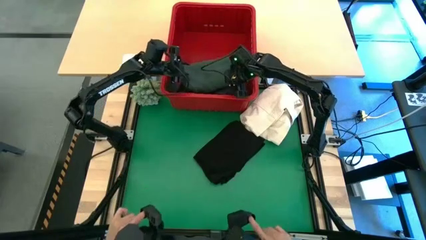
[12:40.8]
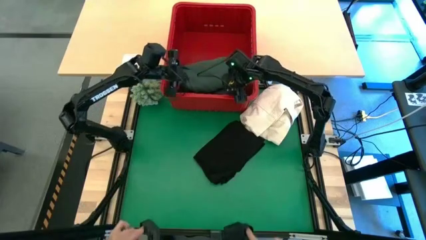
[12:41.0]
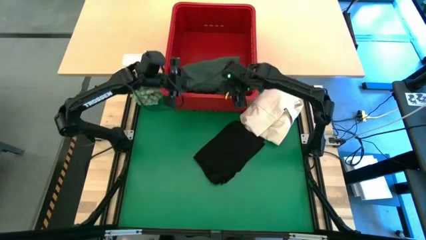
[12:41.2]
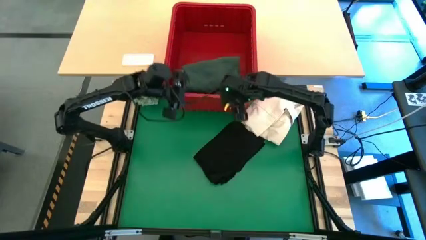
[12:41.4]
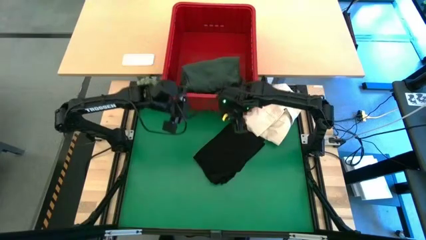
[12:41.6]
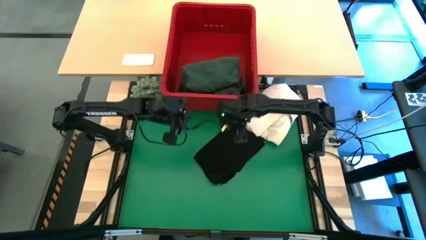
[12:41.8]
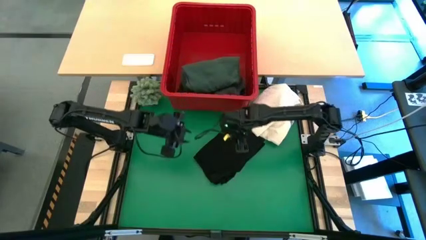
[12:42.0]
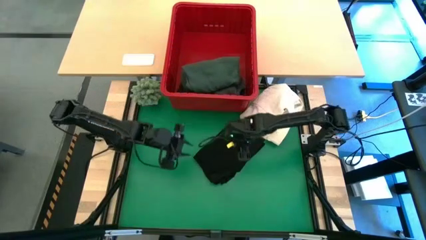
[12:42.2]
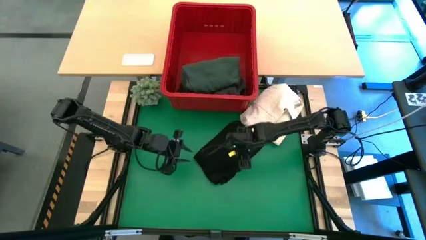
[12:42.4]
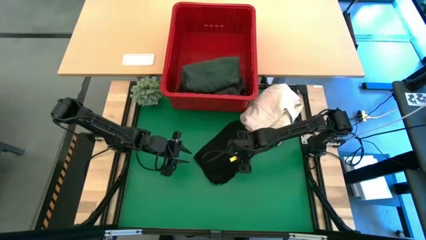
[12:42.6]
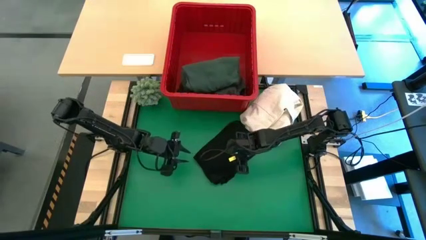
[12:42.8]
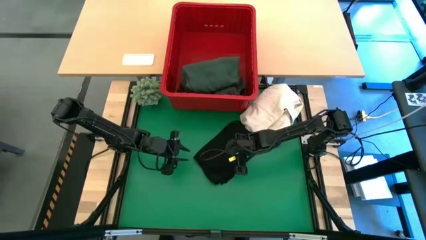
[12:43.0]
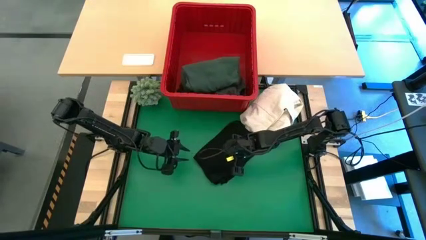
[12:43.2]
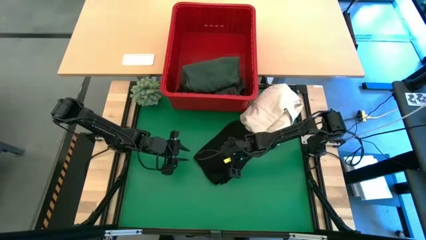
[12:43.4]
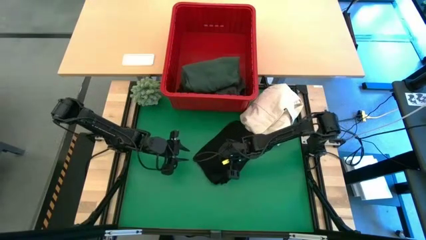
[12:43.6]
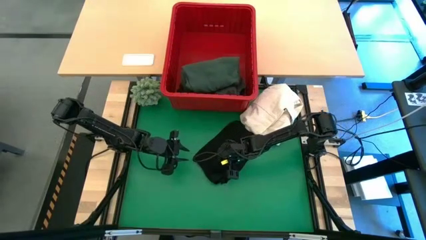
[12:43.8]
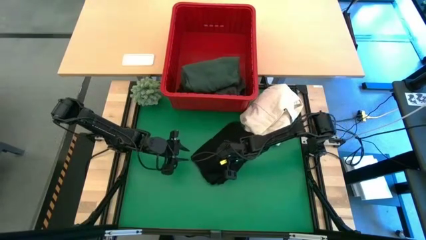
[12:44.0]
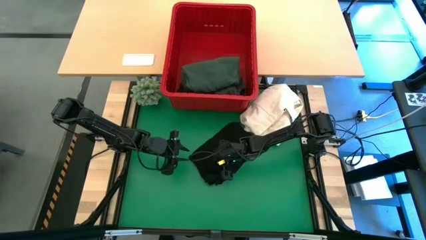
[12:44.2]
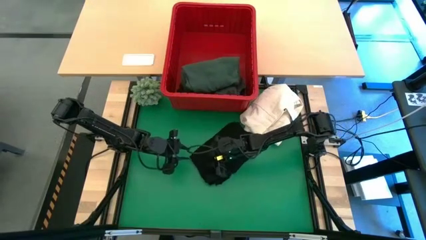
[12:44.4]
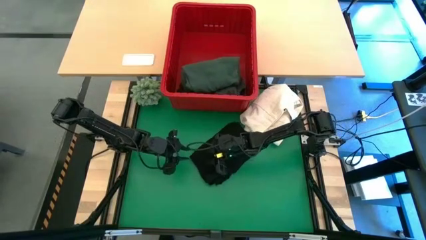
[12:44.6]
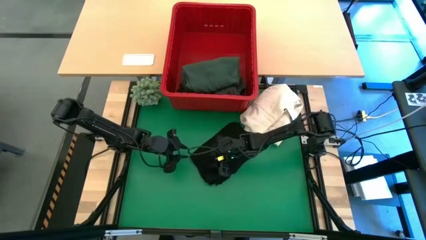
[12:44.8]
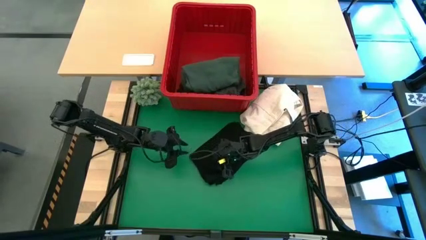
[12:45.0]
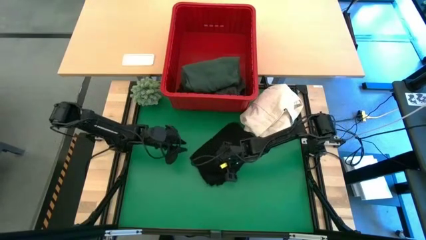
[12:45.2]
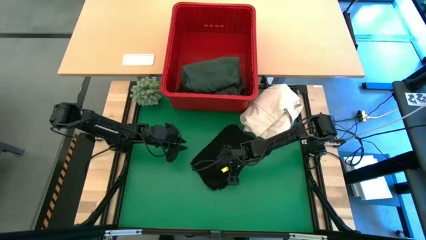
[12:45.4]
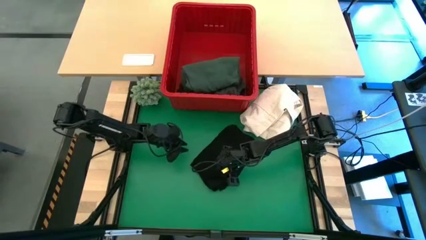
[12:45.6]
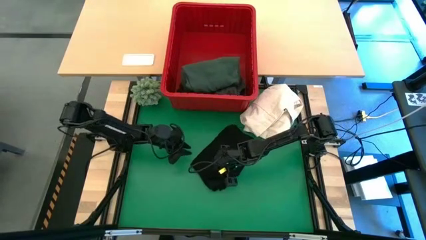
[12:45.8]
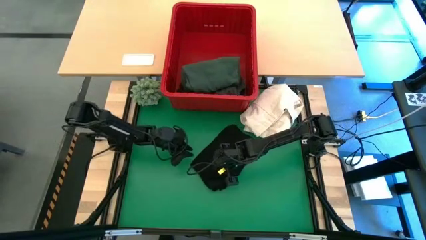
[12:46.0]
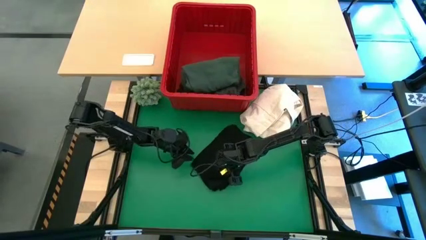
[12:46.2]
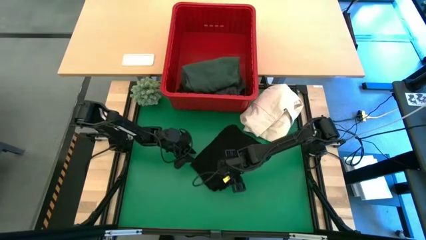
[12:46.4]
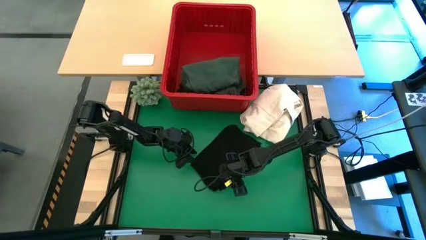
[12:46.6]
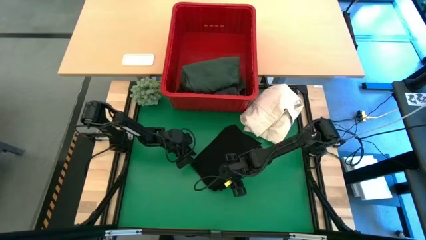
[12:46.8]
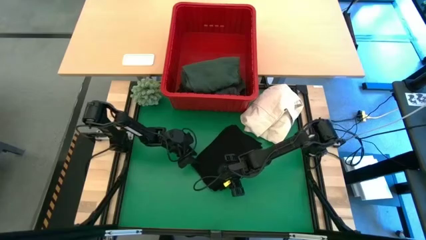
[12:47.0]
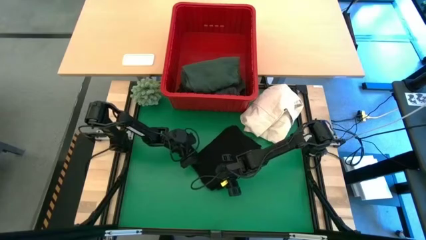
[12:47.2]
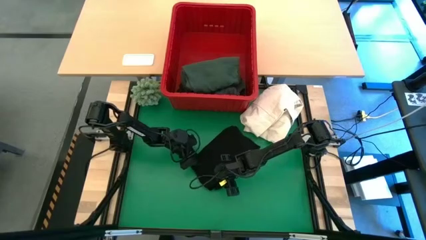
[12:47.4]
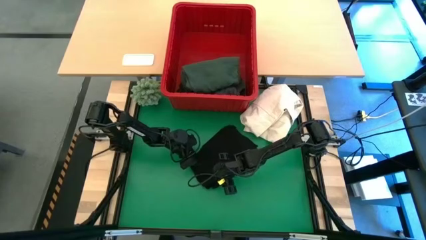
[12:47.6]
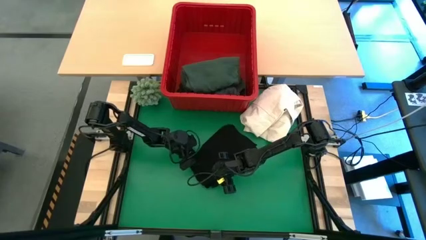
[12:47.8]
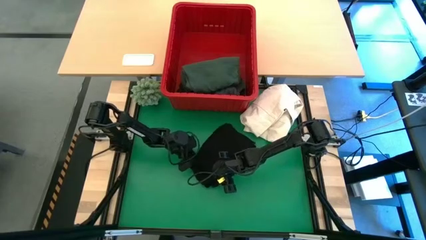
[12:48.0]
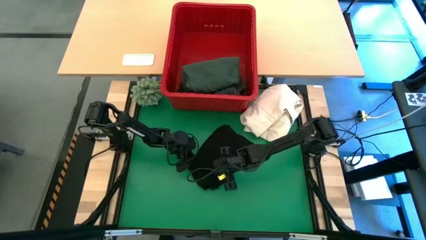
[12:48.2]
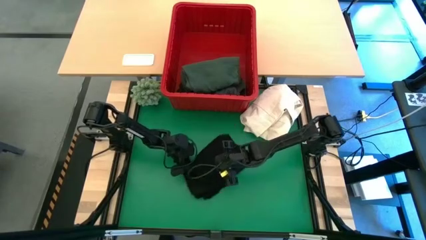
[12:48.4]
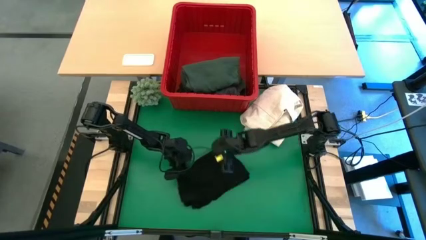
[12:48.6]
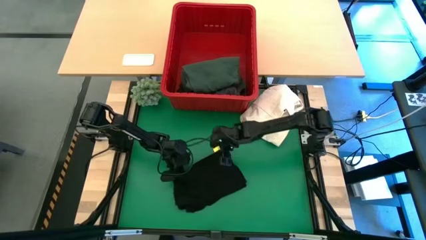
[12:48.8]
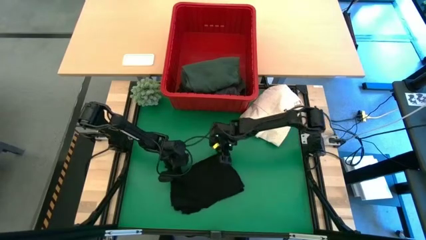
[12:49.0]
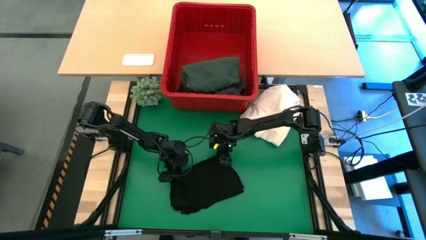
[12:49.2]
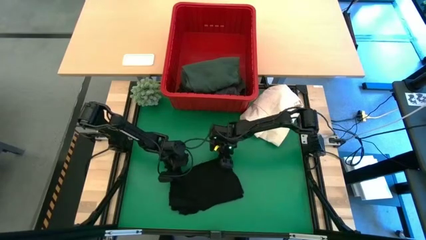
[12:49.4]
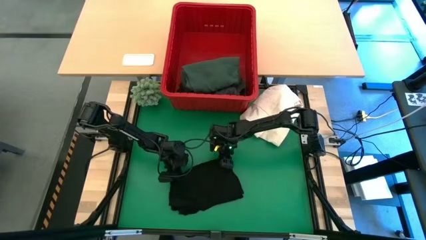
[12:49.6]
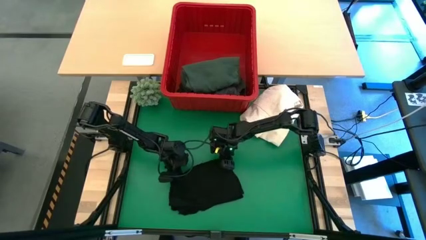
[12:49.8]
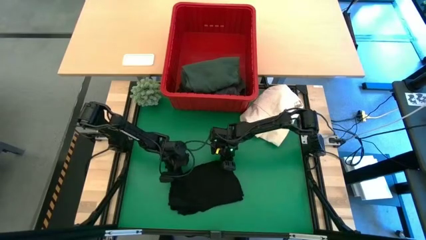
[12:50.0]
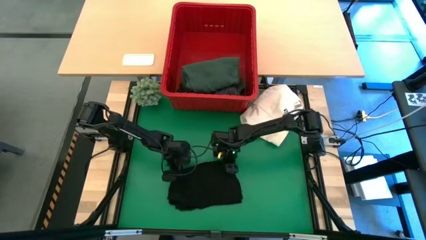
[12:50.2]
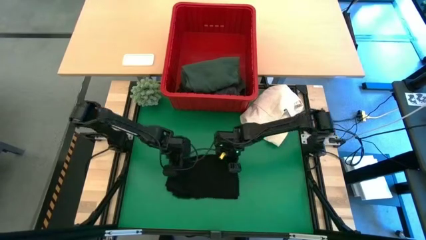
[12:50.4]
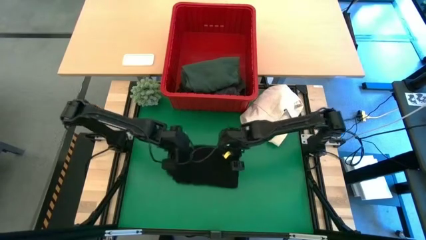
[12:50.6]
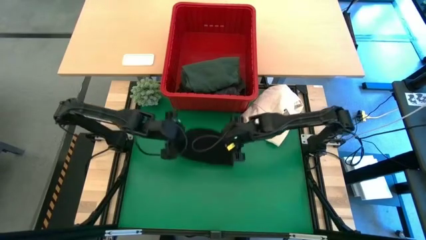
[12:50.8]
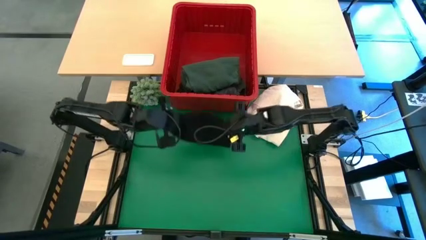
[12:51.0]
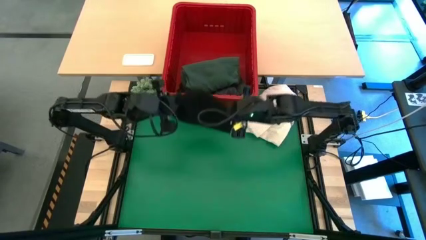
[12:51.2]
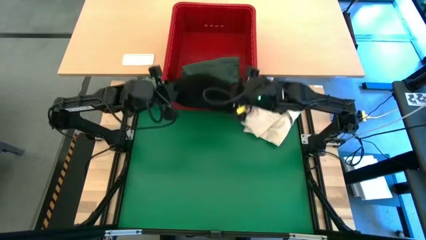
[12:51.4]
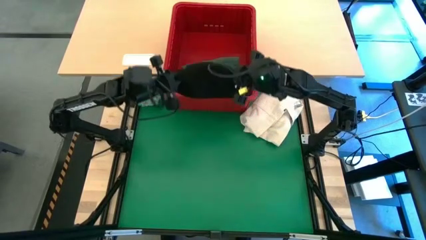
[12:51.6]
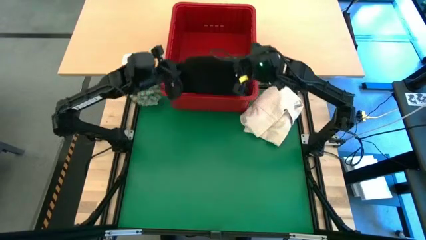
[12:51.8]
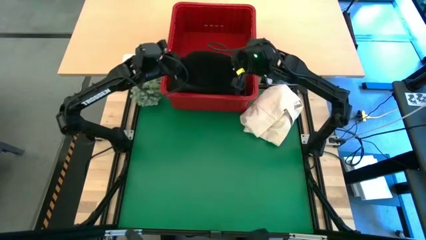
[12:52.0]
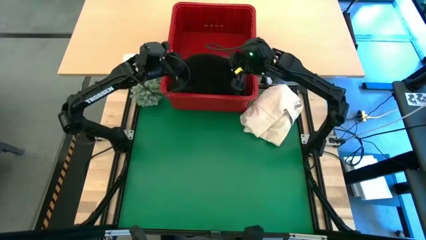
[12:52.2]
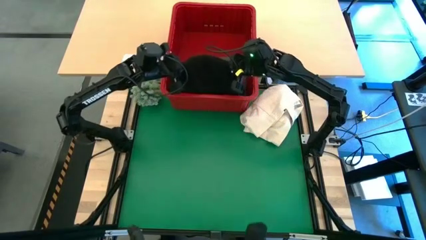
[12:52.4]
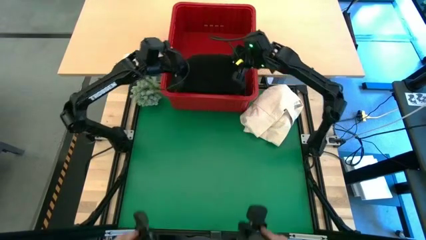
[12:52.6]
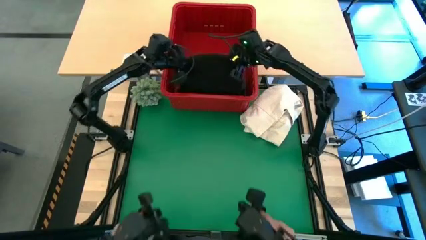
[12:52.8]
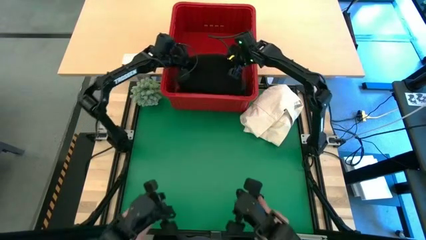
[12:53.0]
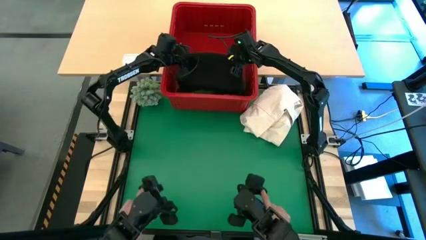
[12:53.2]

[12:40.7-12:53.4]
Task: Fold laundry
Put the black folded shirt into the red bin

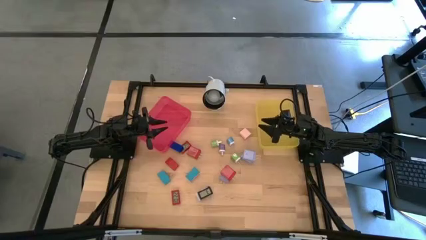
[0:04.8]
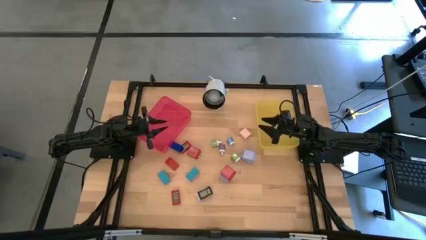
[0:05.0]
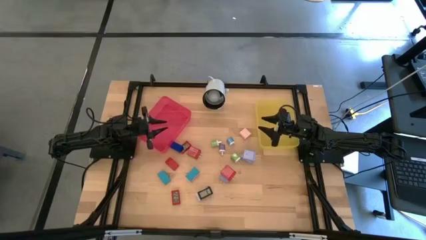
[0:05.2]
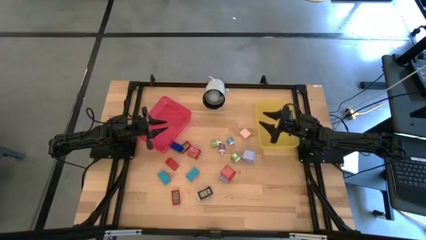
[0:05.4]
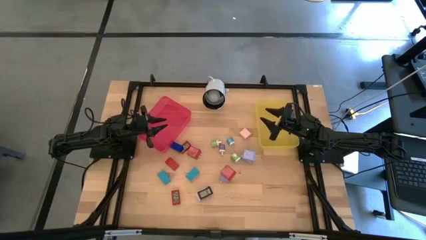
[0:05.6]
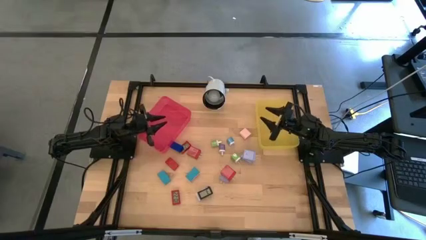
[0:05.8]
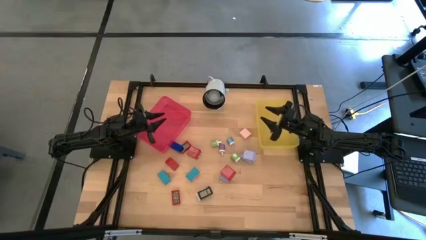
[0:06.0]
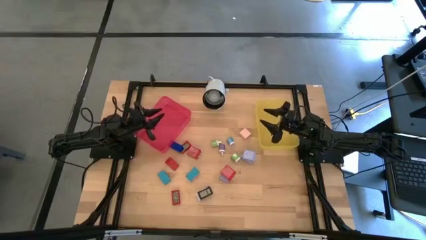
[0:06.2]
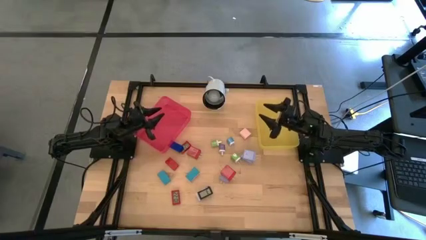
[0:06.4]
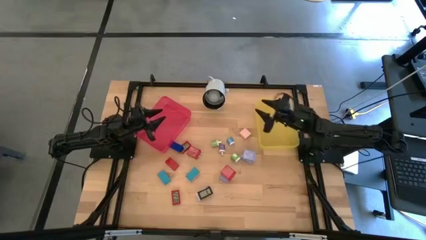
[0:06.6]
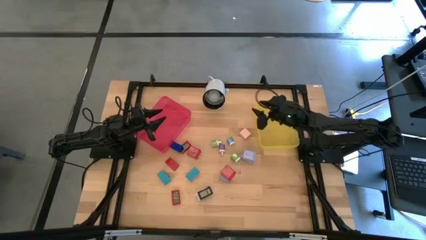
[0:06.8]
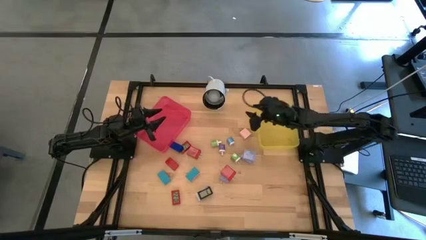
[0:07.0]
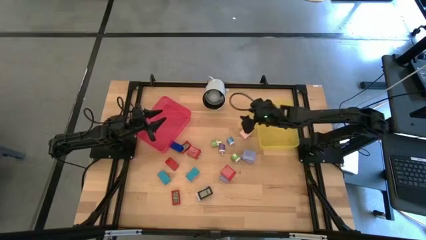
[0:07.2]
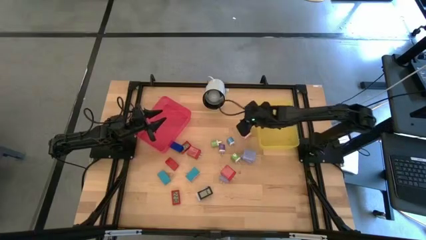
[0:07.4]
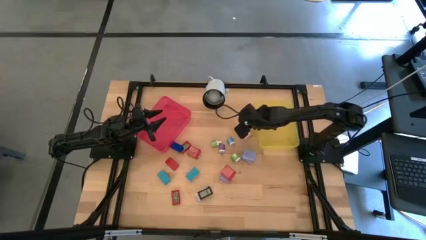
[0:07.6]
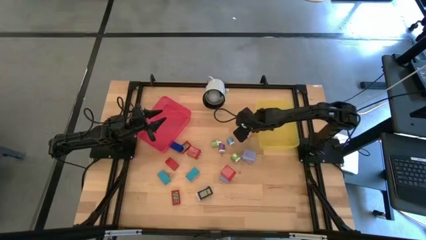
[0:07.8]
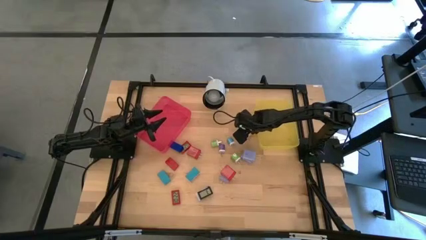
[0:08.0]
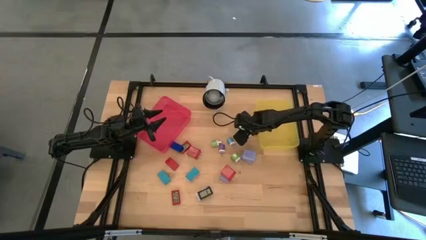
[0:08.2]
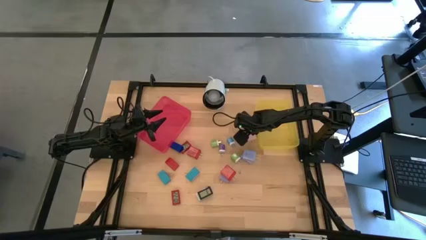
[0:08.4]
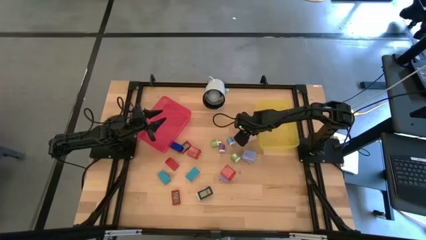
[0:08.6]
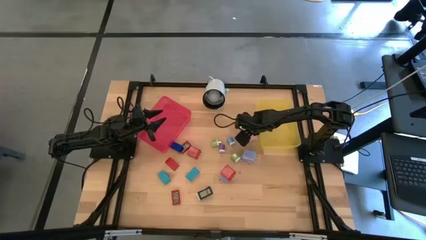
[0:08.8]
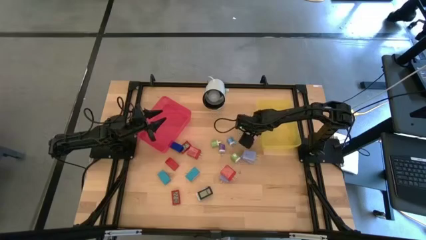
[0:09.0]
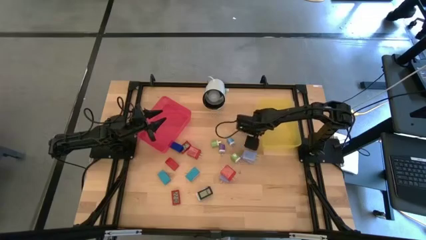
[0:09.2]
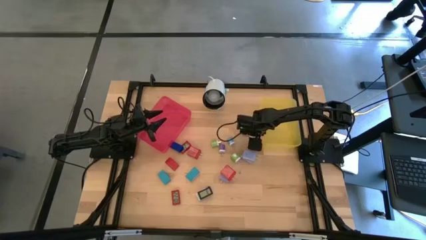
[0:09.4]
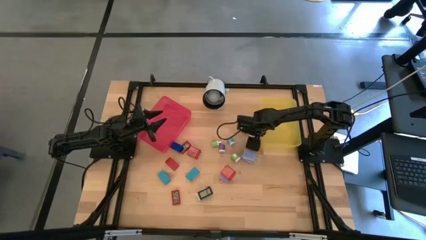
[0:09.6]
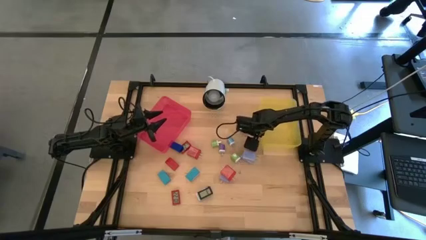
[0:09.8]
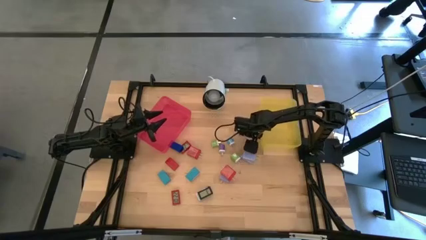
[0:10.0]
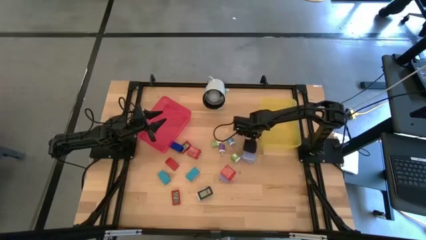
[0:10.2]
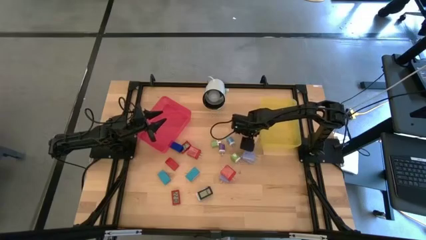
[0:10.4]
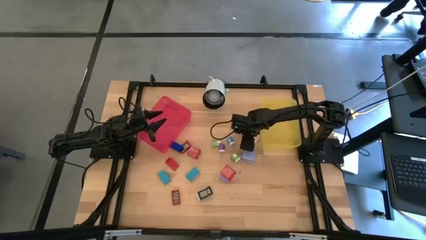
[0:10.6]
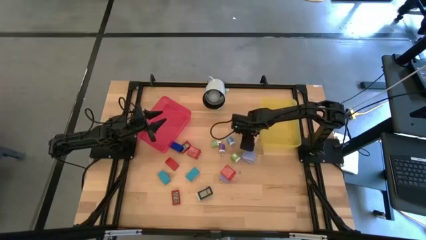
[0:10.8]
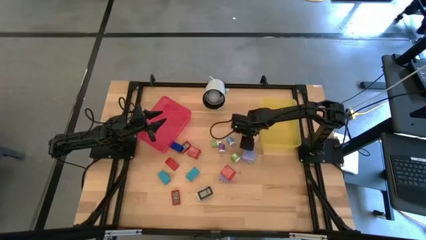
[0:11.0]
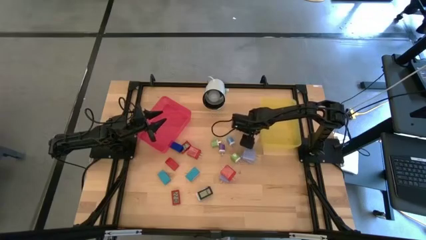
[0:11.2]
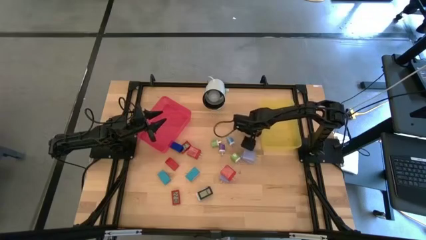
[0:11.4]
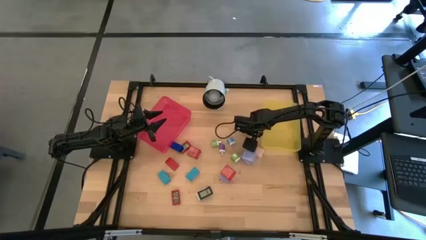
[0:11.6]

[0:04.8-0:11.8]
Task: Pick & Place Office items
Put the light orange charger adapter into the yellow bin
